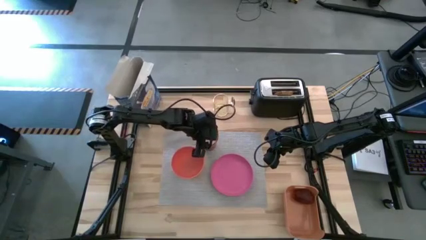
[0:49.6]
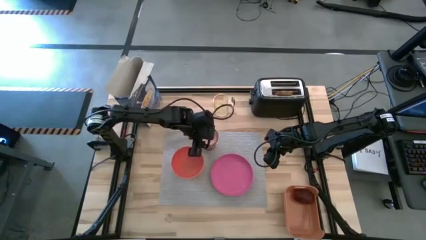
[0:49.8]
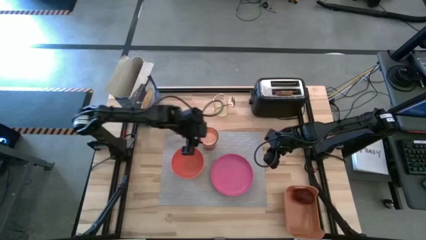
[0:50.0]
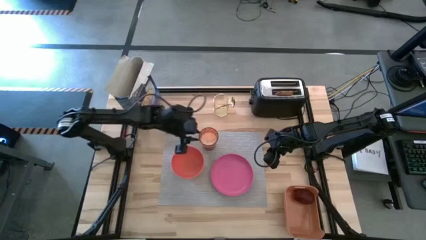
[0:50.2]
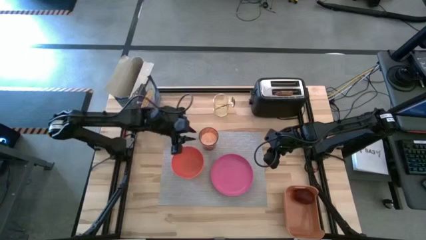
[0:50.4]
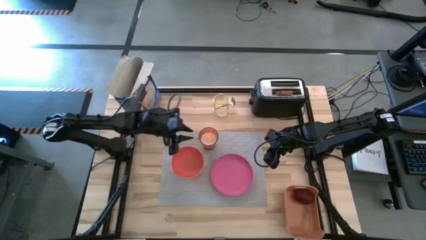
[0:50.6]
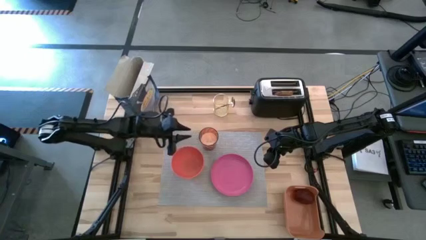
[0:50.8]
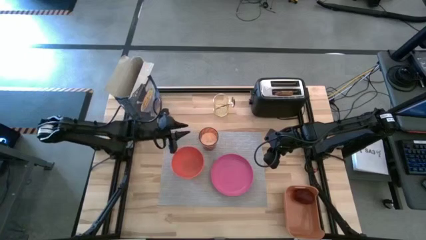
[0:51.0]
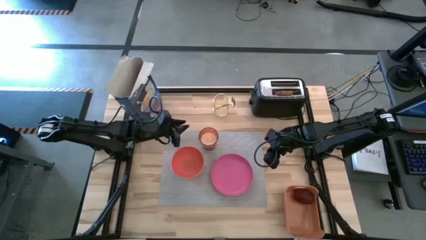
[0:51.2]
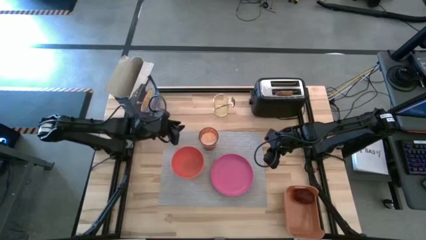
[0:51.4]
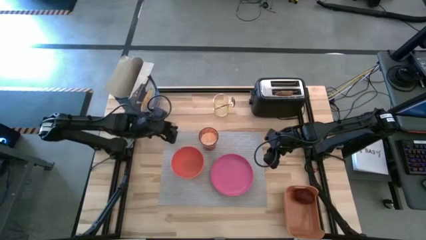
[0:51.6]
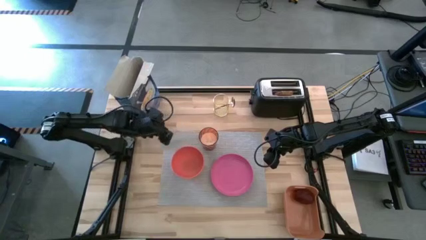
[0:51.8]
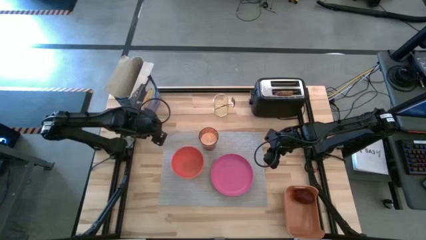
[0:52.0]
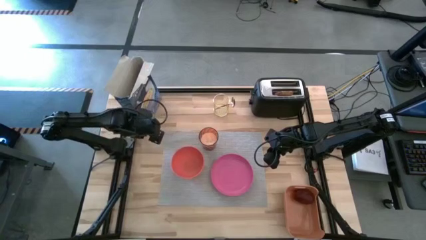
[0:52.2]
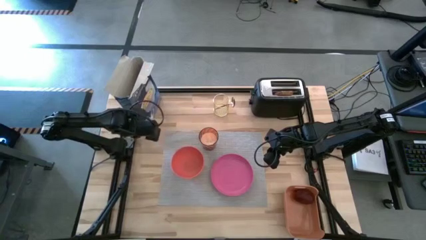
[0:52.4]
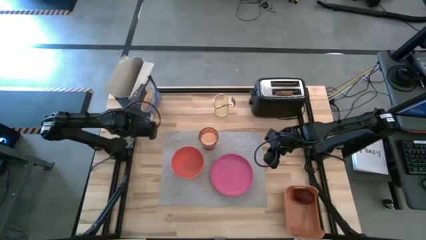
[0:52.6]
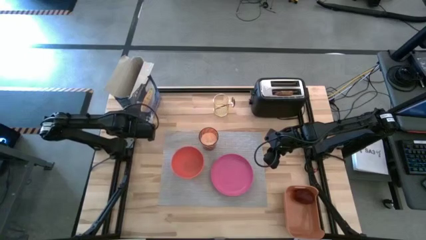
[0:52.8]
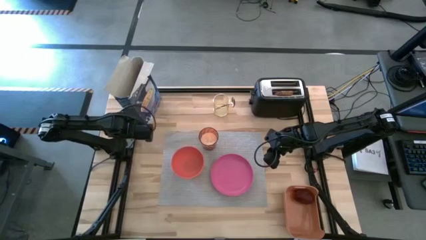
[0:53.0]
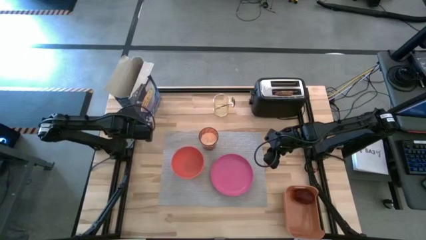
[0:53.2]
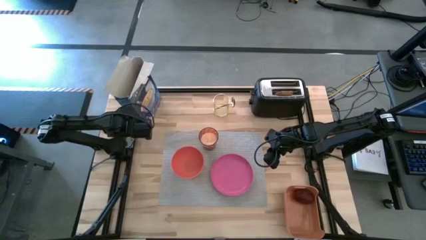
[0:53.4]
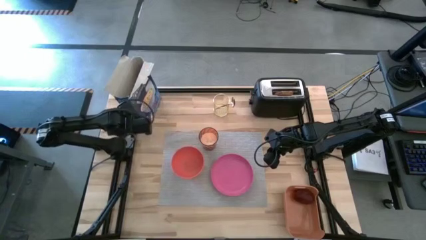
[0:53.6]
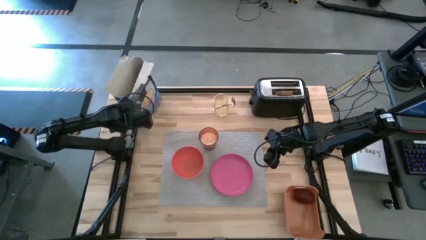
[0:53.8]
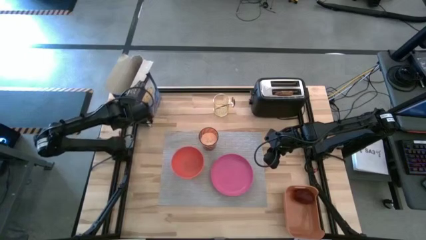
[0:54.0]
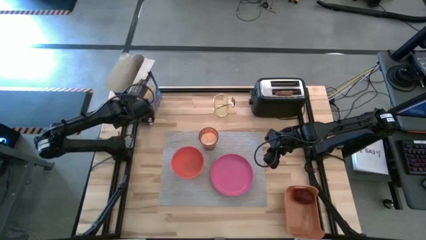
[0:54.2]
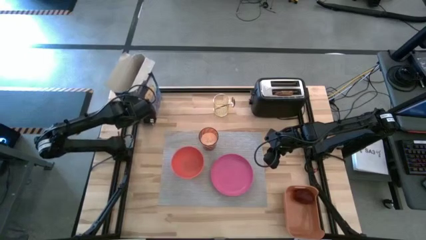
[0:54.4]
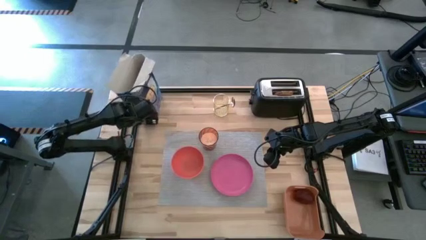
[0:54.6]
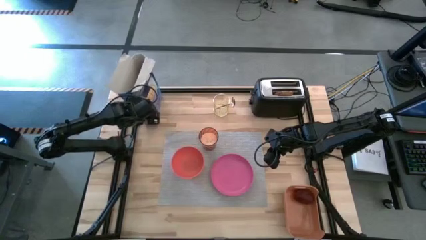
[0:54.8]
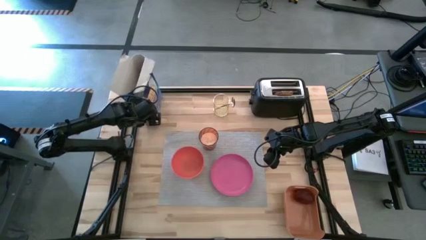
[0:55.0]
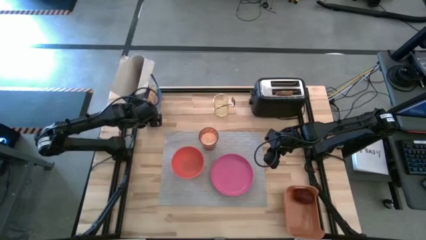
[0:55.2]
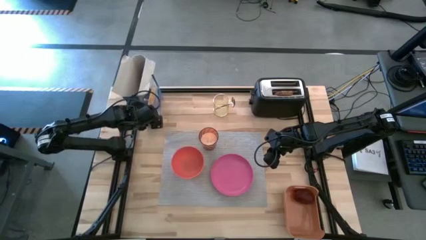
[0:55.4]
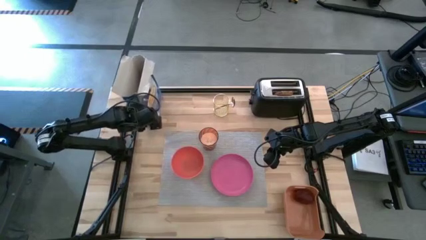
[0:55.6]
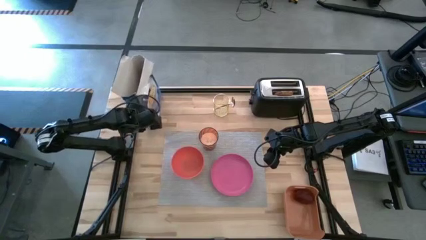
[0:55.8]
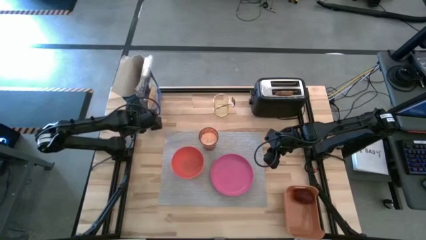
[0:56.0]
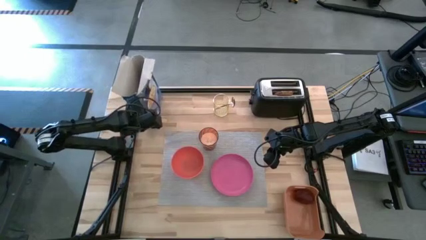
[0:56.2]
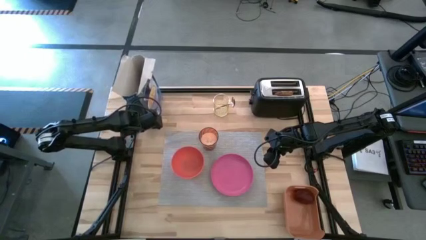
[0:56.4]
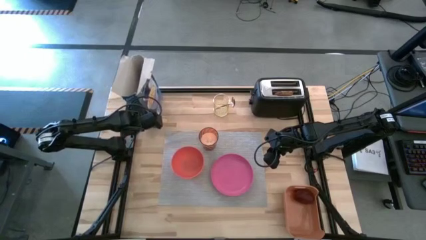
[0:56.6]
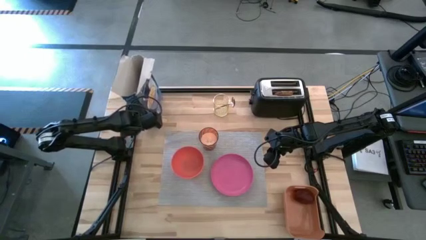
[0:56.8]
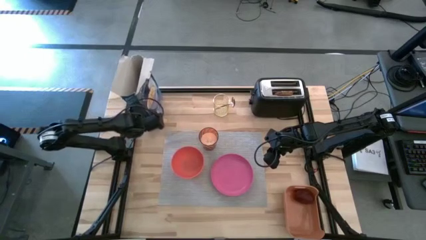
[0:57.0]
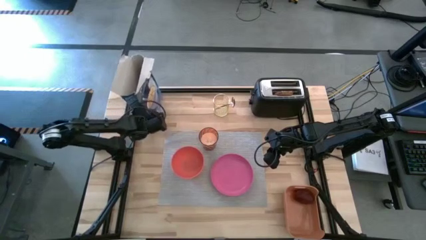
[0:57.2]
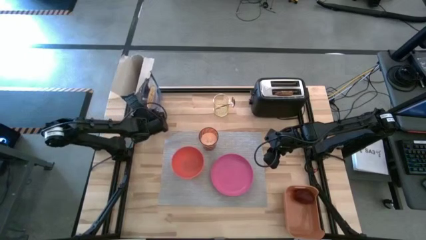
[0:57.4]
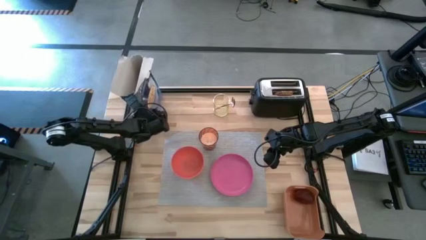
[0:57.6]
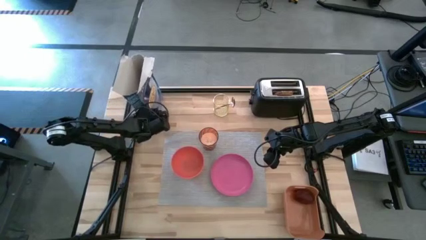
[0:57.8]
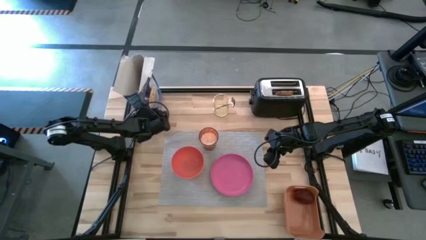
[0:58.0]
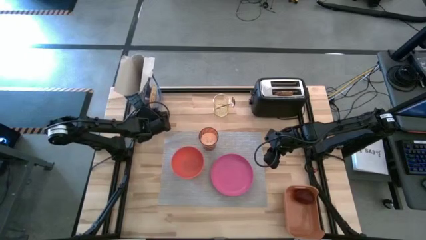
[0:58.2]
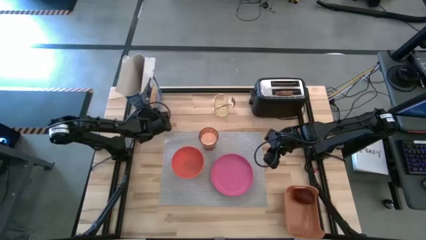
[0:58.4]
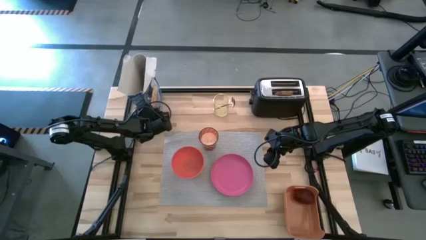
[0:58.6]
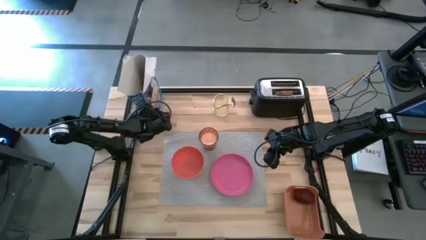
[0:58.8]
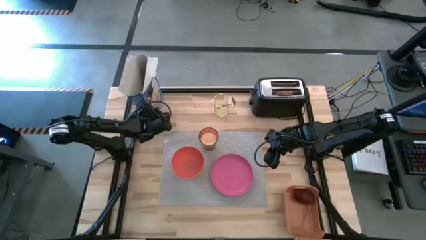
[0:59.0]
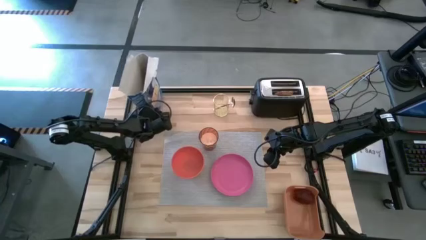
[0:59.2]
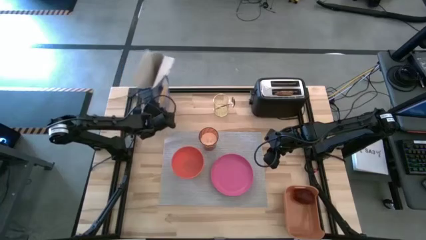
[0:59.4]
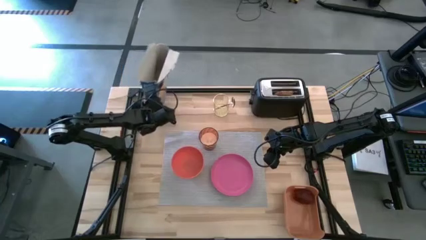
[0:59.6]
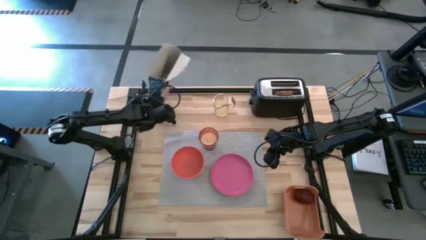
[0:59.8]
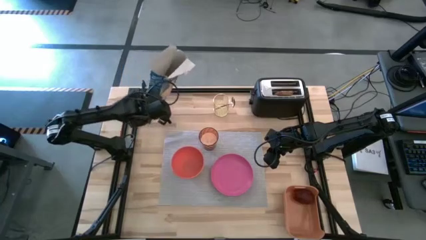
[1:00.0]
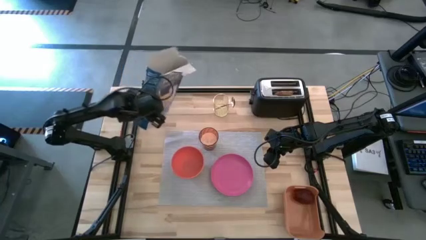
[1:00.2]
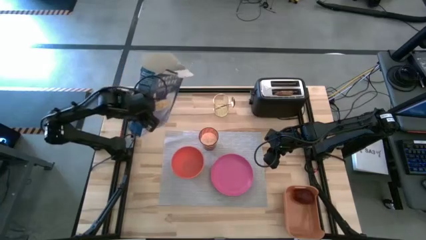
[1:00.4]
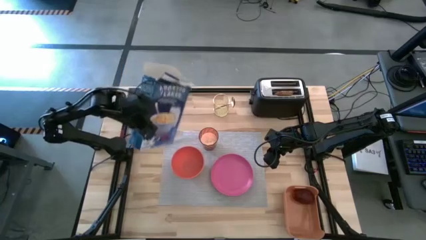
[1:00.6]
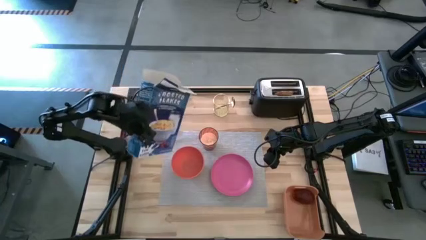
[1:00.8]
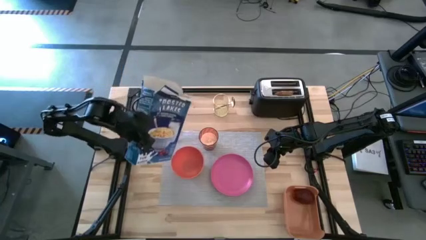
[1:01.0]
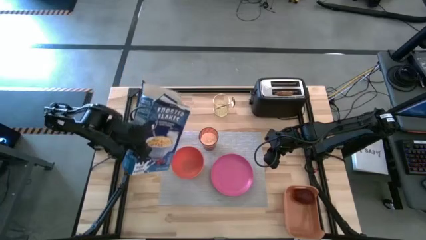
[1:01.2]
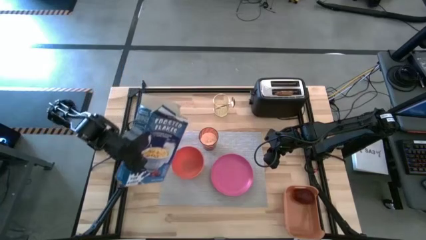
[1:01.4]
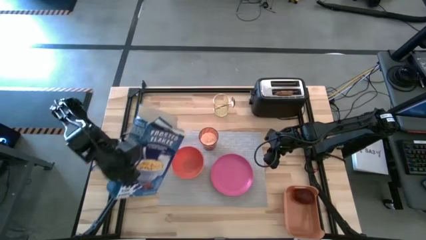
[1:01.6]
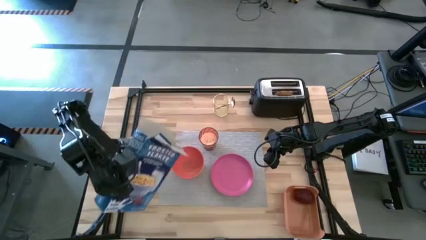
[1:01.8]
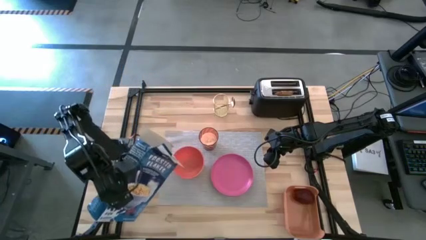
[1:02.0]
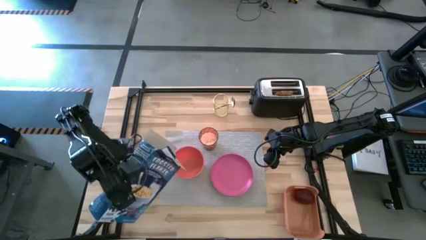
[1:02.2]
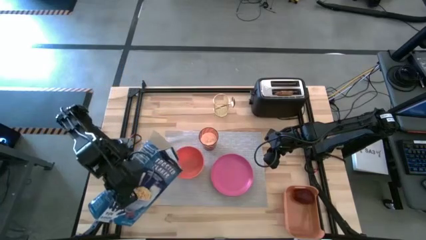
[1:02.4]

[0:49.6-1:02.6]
Task: Arrange a breakfast setting
Pour the blue cereal into the orange bowl
